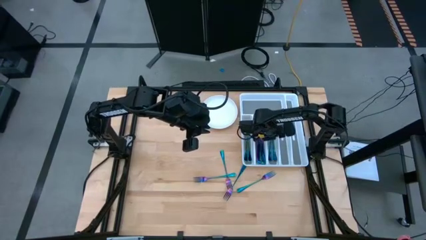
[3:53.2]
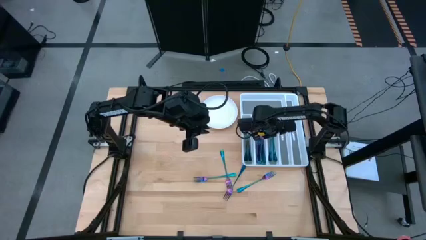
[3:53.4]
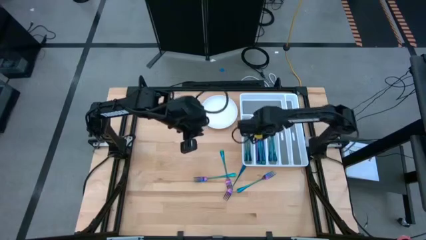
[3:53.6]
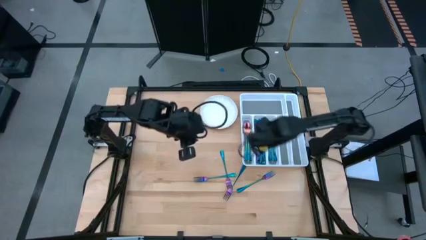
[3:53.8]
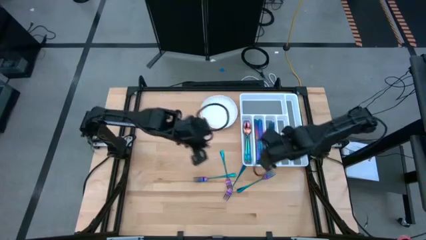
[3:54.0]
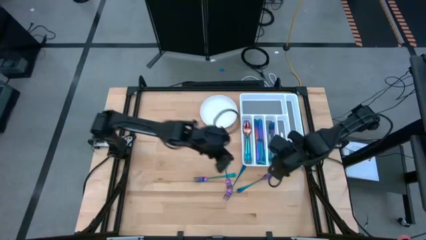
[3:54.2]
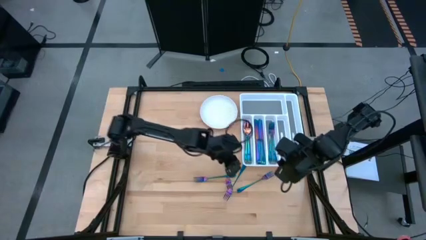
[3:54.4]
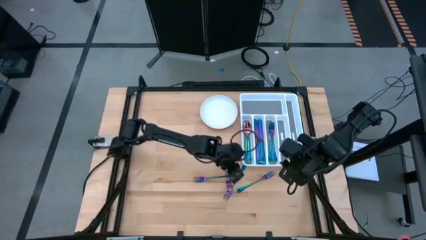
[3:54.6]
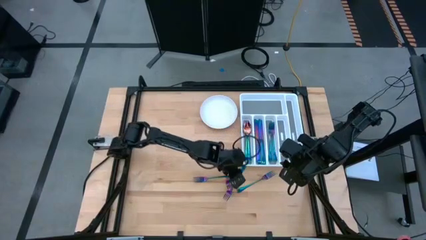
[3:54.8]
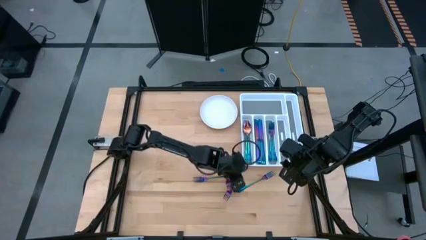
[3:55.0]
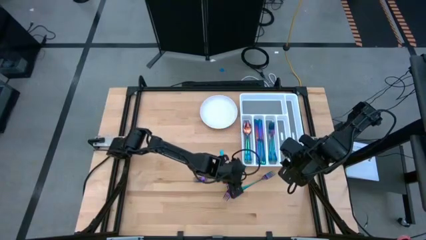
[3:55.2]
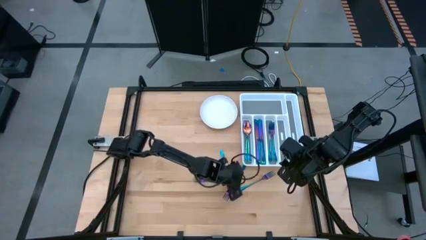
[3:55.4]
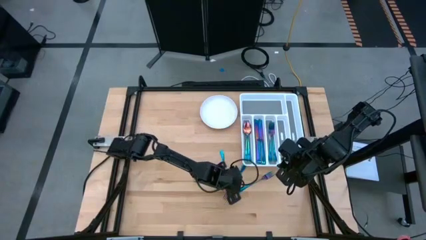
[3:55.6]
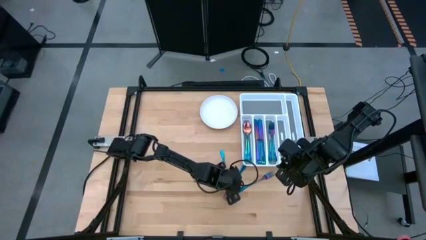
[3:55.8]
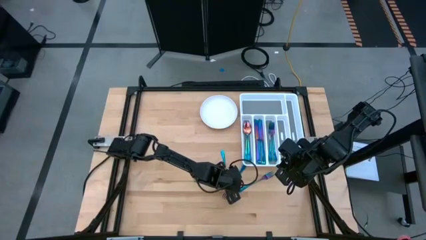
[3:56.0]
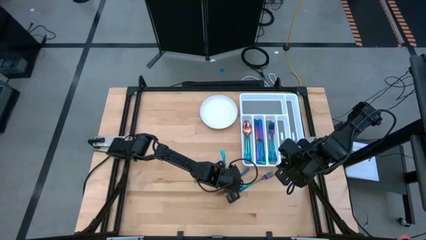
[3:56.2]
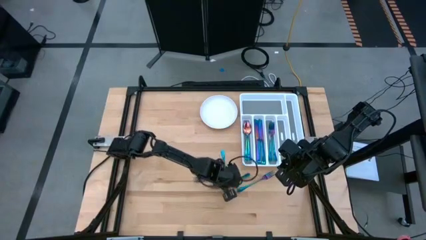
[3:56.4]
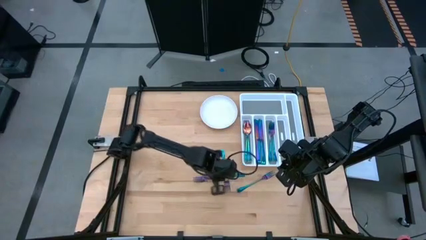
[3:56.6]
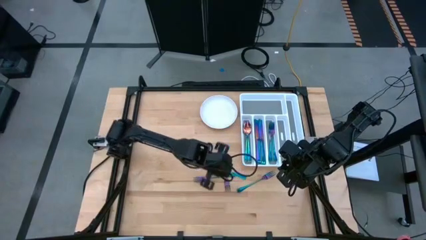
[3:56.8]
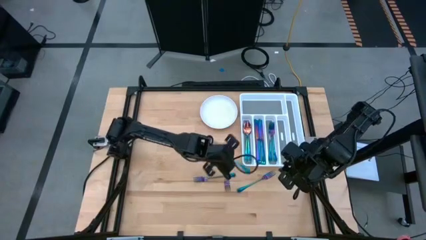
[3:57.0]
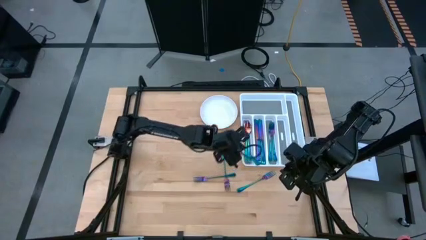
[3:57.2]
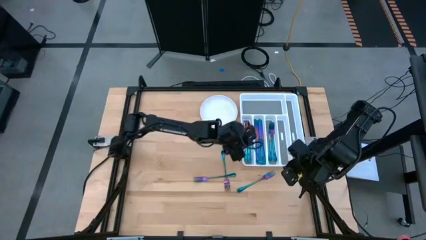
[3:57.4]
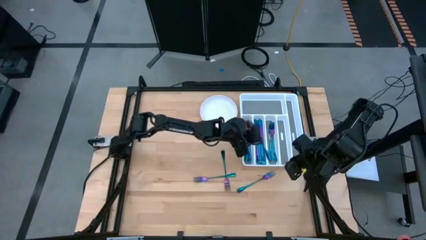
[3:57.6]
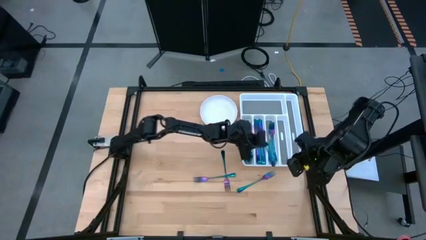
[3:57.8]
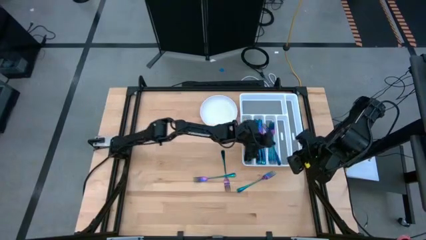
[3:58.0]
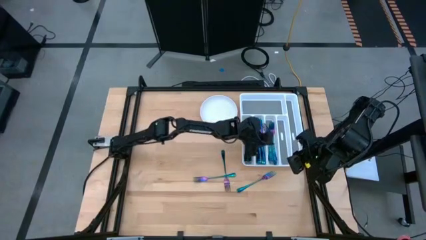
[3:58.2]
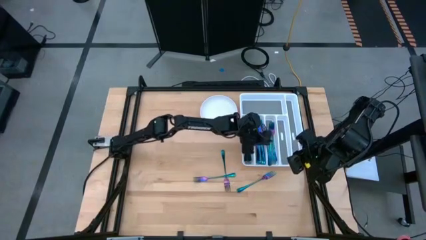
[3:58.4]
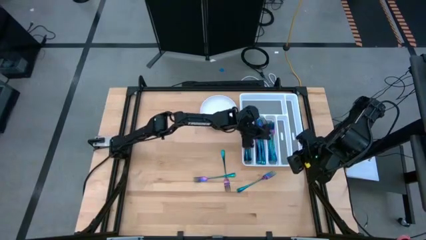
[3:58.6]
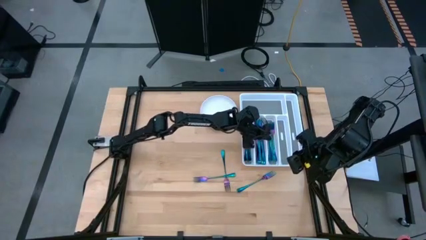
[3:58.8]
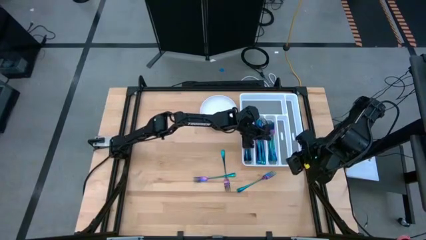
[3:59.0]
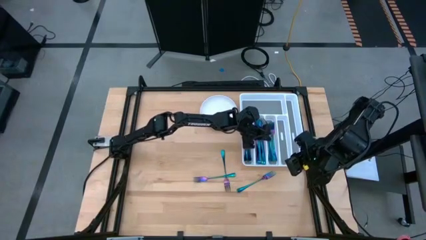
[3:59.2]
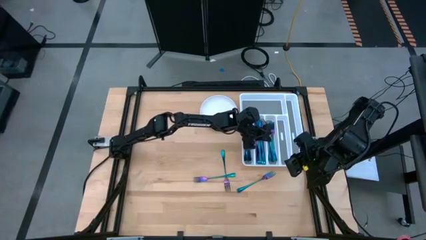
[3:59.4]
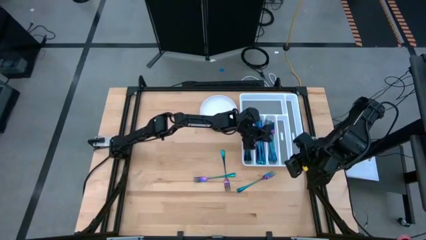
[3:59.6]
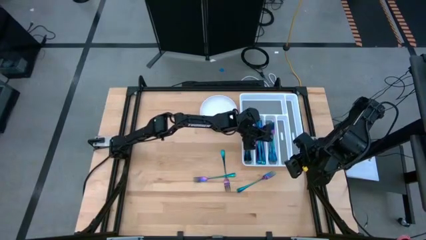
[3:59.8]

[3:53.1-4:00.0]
Task: Sort silverware
Put the purple fork into the white silverware tray

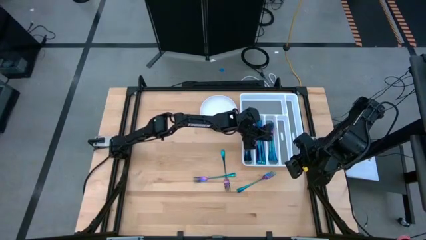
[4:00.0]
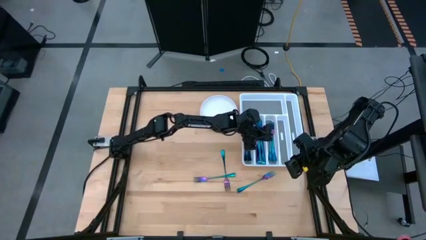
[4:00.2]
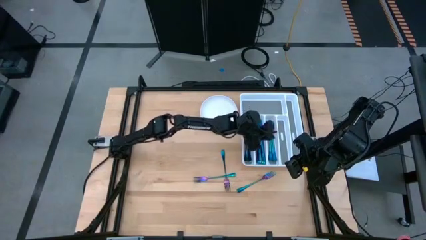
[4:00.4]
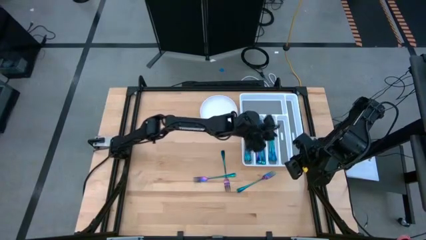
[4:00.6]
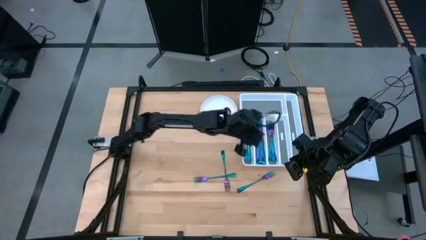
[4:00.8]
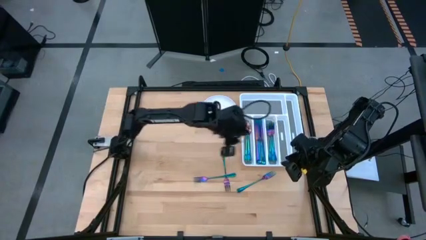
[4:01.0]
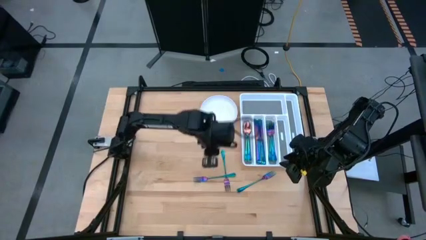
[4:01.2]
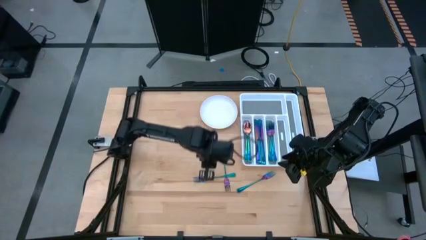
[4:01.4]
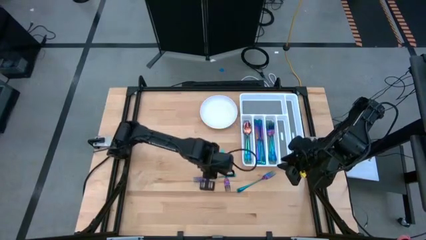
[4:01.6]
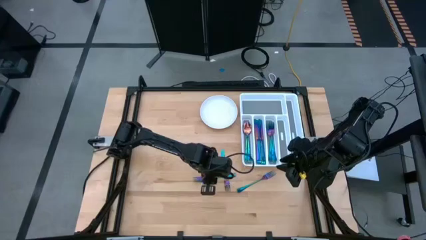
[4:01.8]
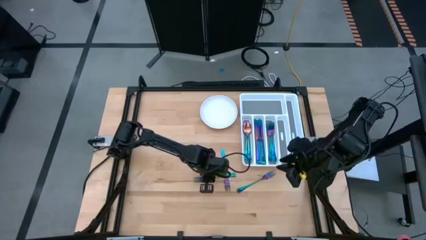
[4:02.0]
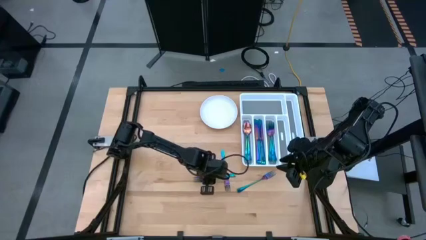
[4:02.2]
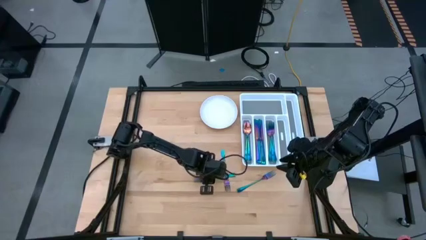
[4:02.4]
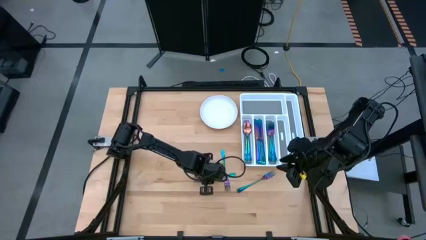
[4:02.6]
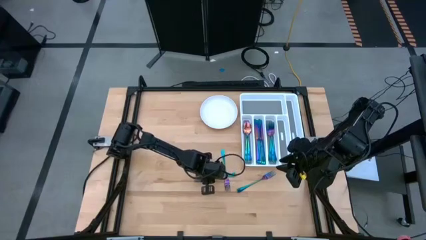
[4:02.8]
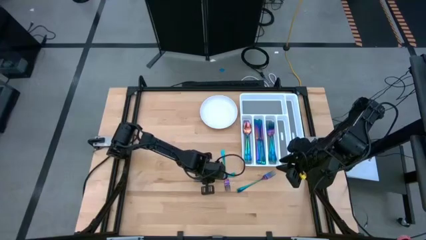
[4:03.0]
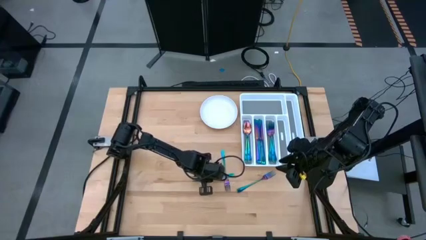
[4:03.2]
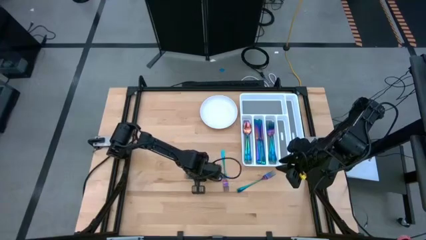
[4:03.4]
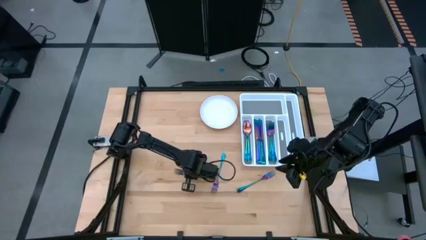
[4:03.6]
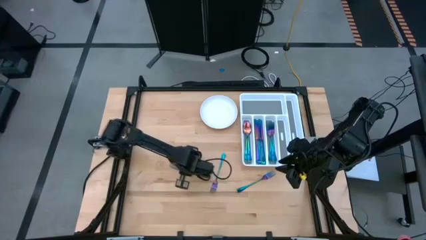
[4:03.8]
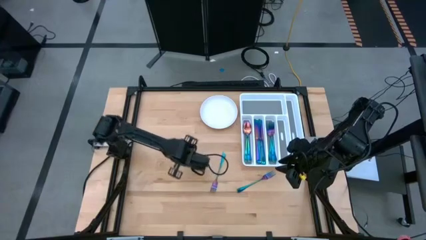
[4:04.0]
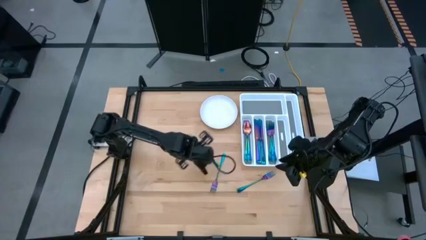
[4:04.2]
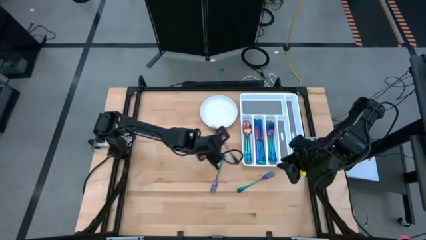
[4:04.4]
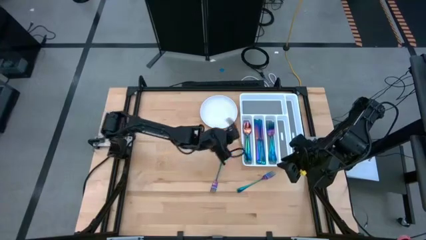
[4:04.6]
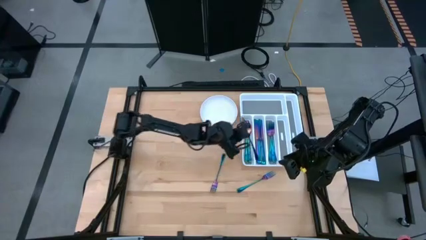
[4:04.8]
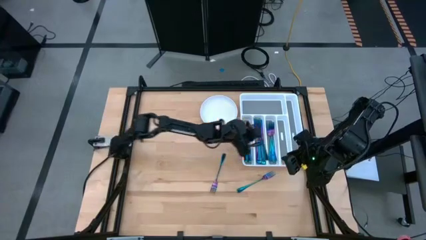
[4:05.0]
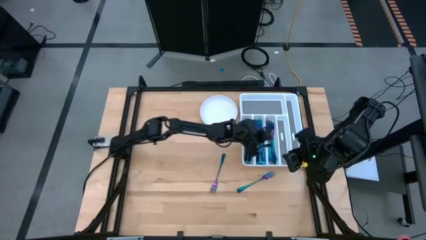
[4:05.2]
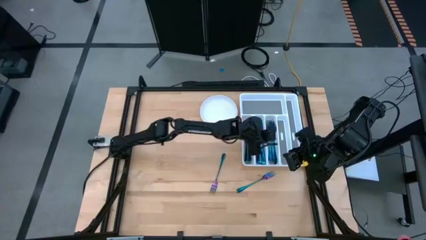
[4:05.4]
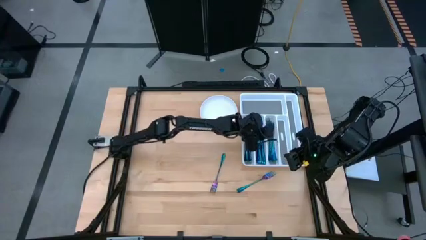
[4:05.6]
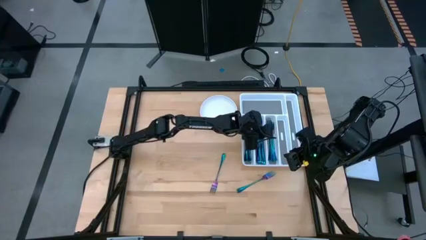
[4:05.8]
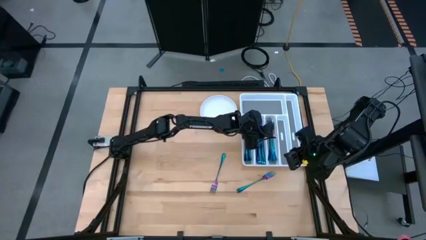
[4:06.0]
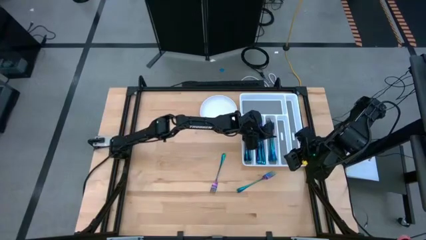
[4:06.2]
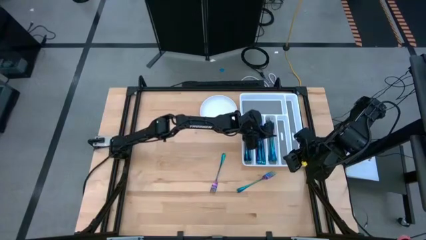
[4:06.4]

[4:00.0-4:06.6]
Put the purple fork into the white silverware tray

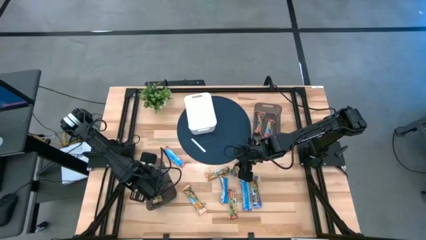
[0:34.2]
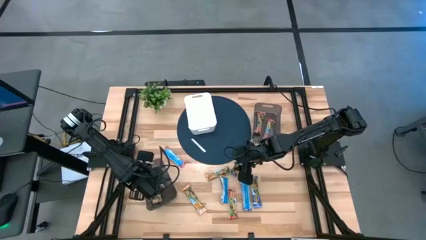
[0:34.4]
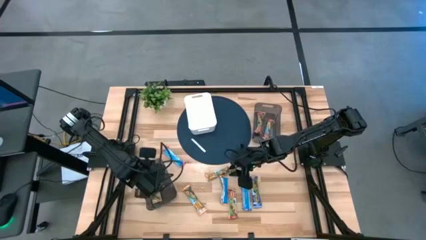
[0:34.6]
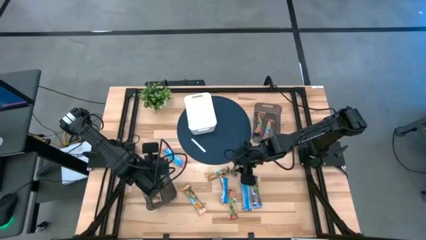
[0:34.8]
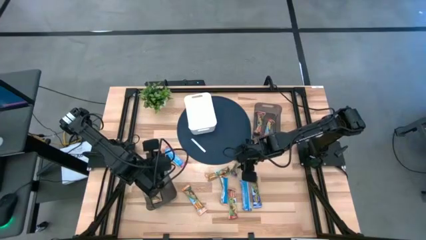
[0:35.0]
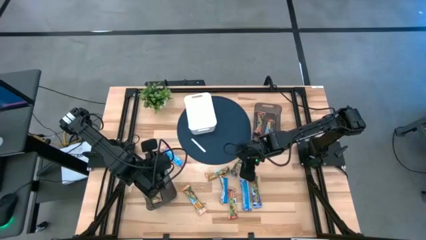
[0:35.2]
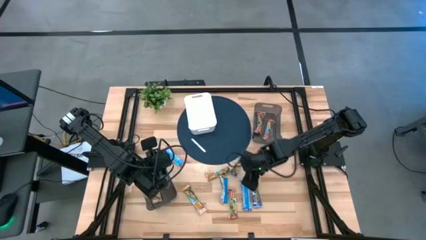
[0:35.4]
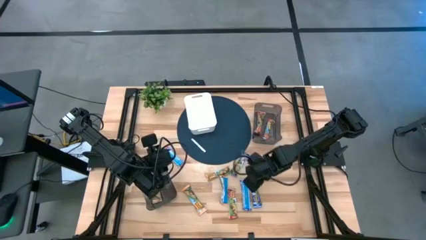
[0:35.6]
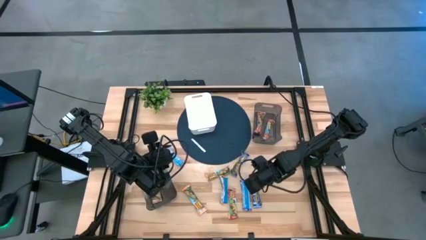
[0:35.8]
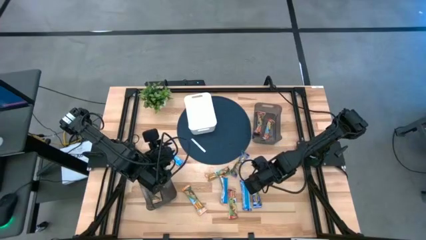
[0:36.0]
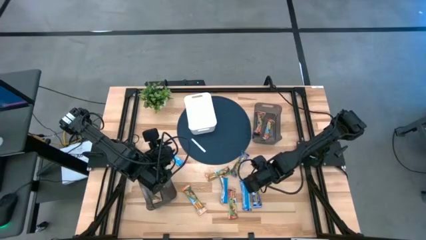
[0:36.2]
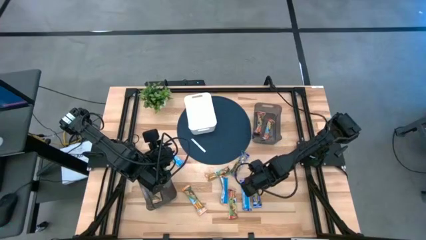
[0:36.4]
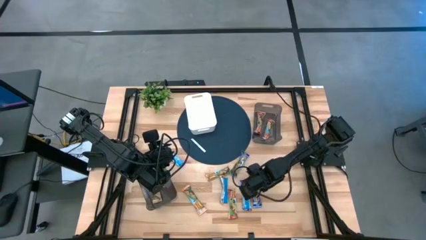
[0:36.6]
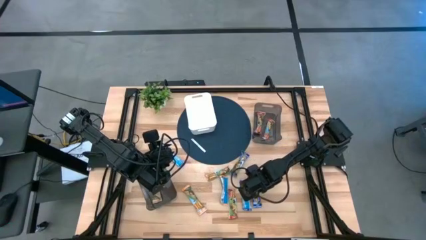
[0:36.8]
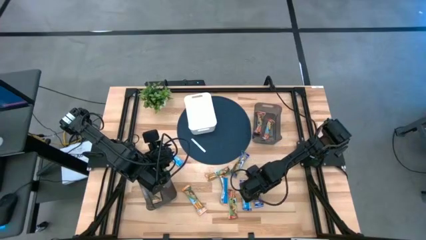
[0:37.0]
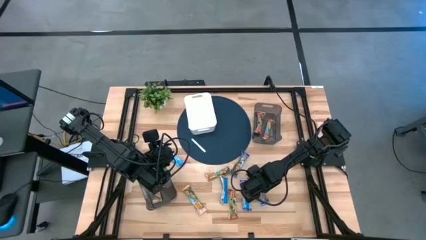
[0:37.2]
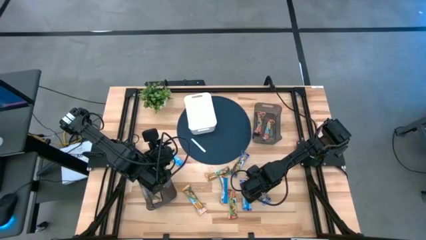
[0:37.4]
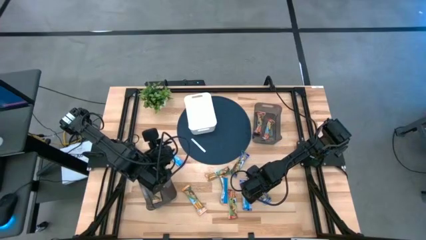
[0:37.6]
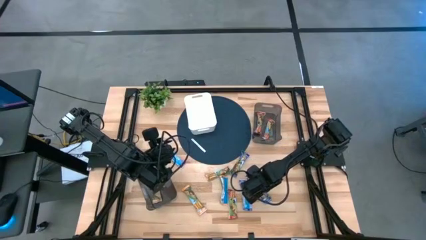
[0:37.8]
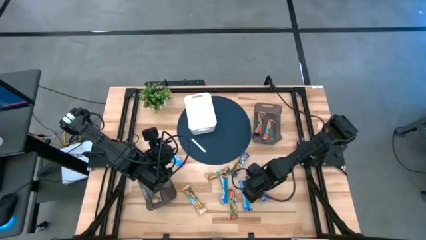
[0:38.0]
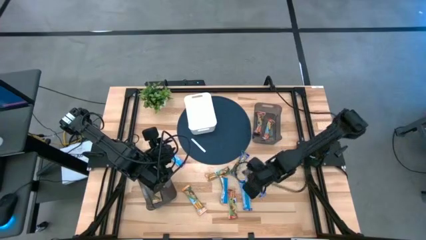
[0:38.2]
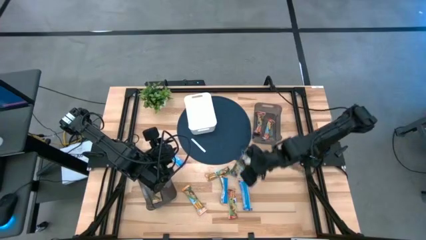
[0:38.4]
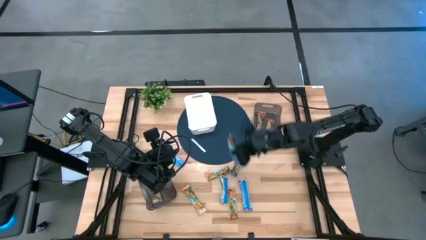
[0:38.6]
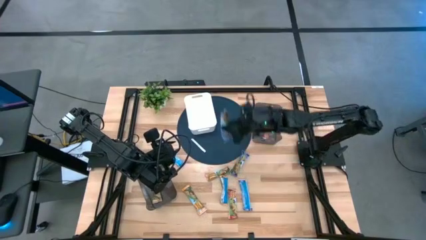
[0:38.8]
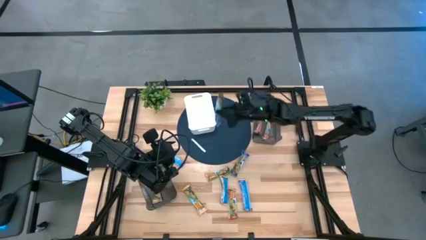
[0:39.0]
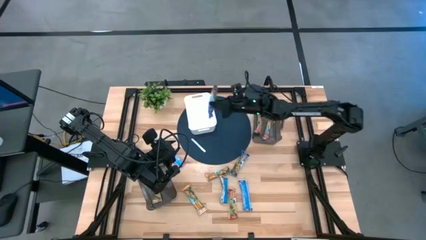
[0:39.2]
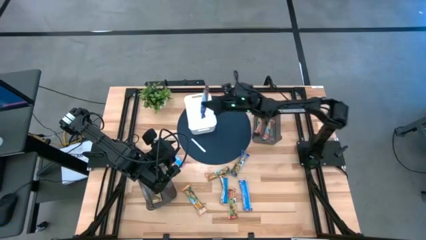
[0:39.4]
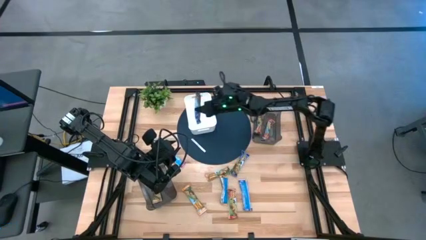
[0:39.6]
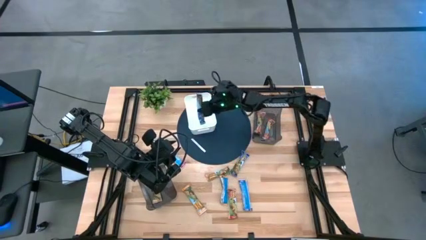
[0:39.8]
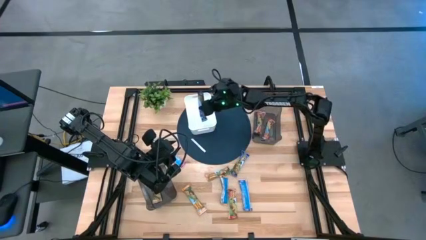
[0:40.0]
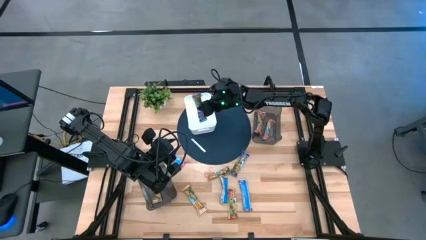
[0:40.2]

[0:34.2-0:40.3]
Task: Pick and place Granola Bars by type
Put the bottom right blue granola bar into the white bin
